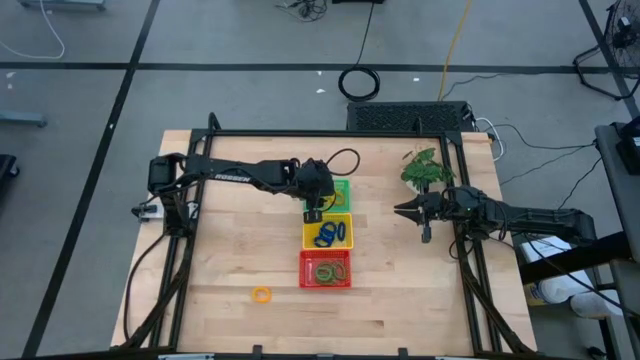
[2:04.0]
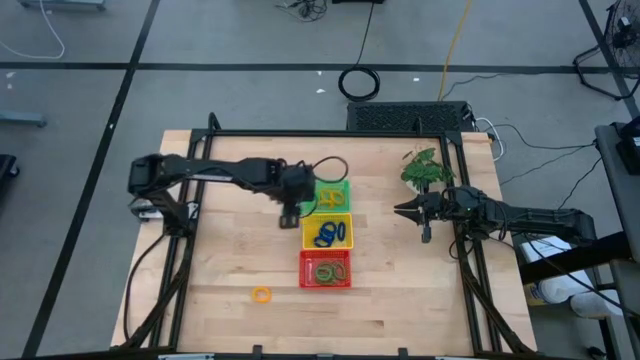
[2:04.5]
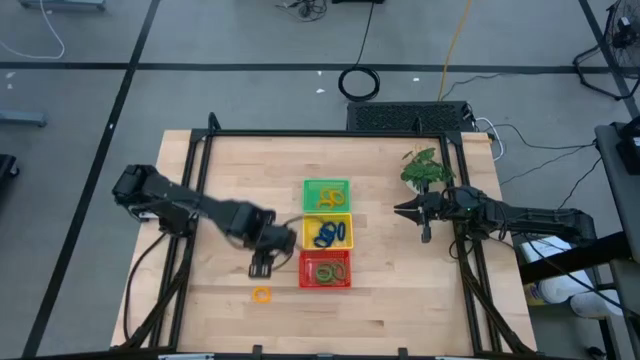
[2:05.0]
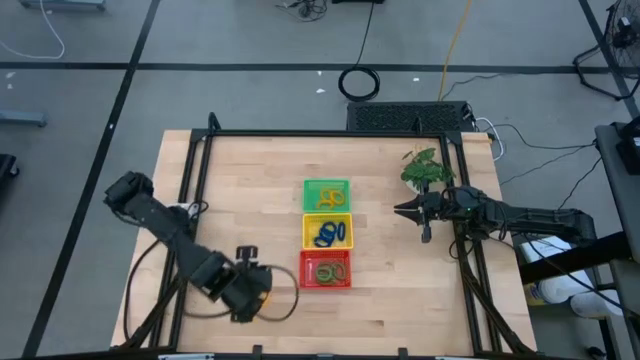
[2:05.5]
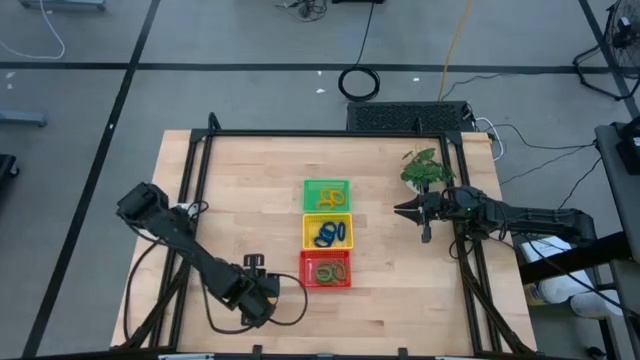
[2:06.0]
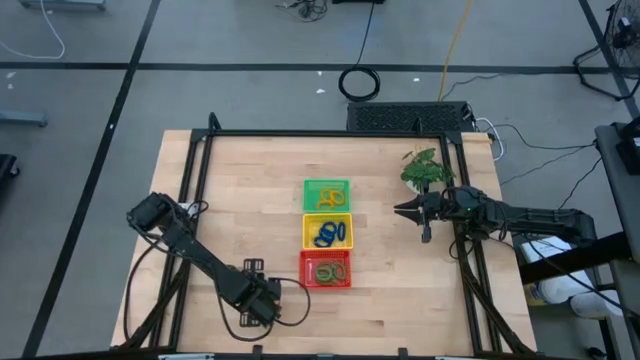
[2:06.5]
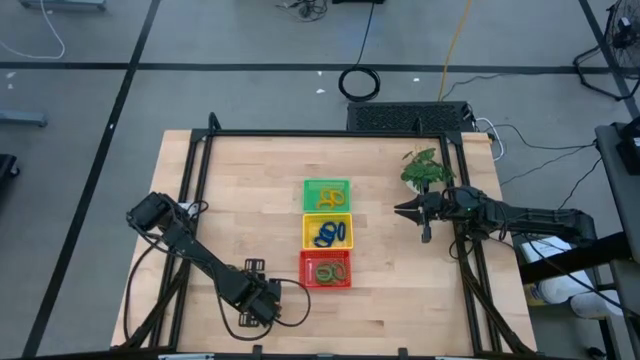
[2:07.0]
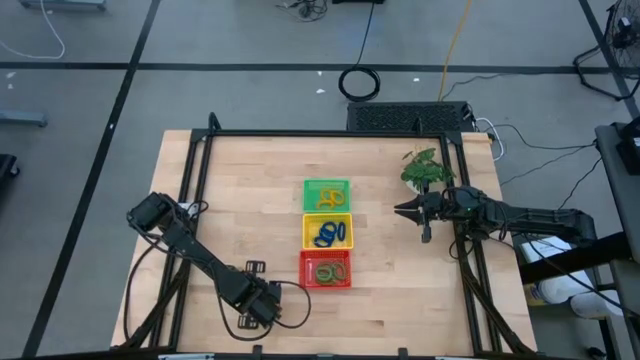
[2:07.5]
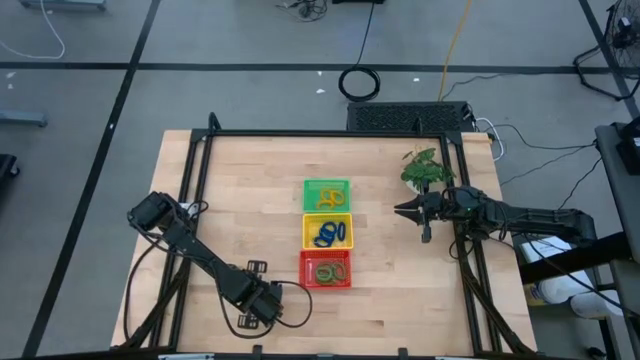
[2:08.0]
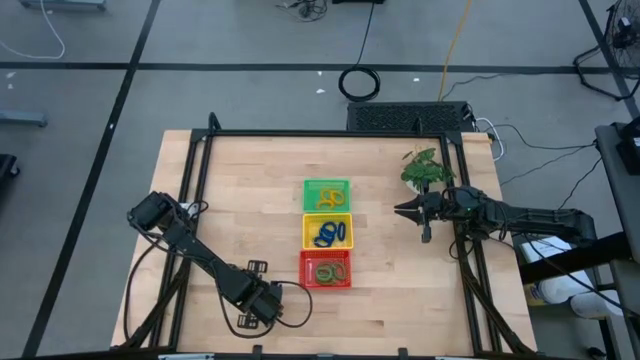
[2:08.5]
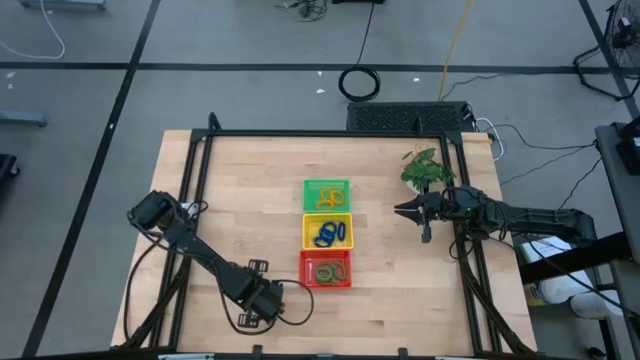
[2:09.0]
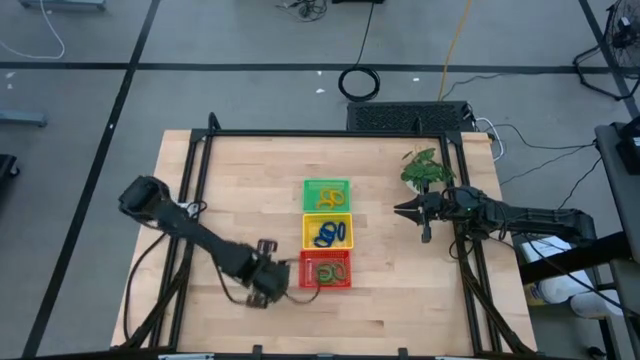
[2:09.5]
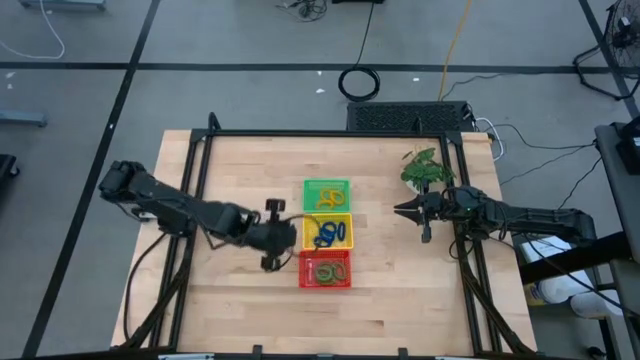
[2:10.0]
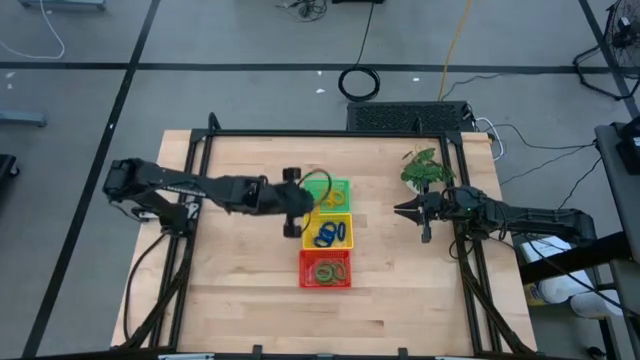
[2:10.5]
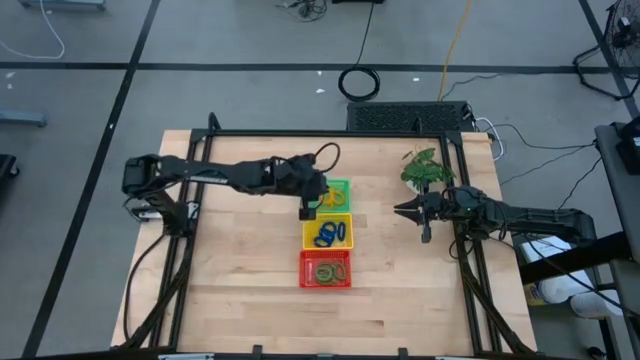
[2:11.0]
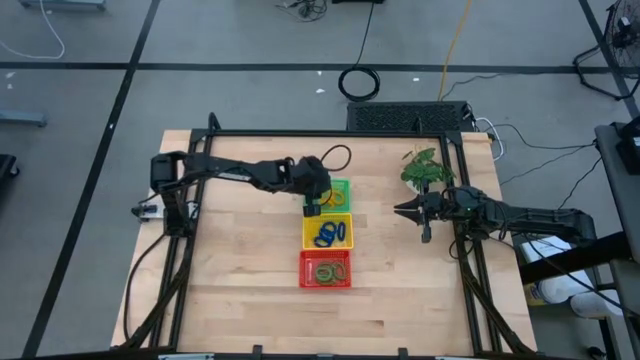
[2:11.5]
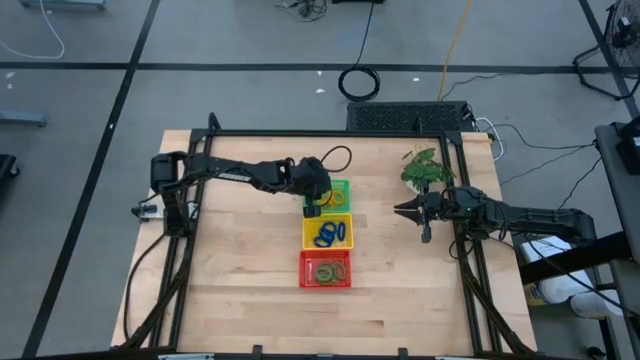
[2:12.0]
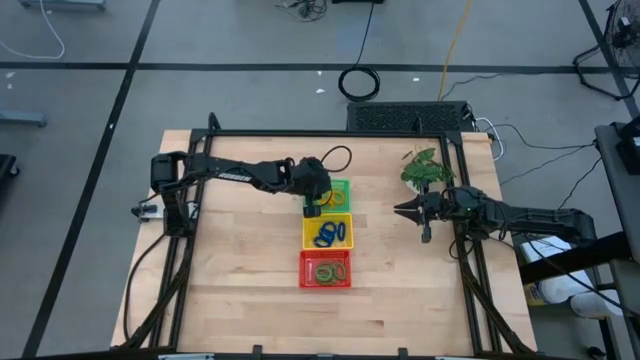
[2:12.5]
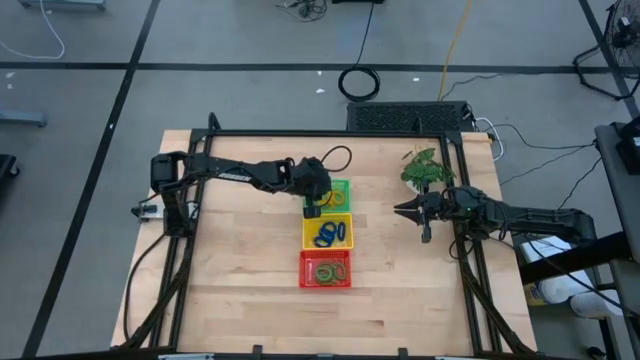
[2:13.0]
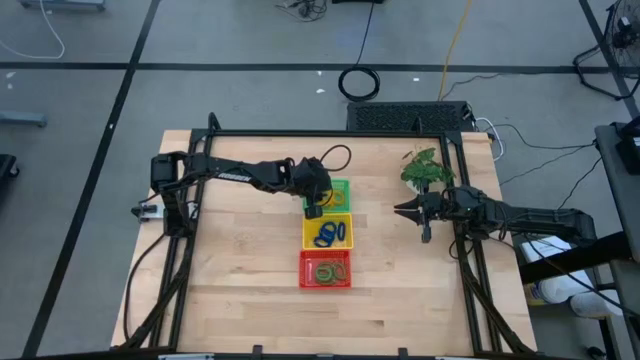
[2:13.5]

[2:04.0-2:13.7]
Task: Sort spring keychains into baskets
Put the yellow spring keychain into the green basket

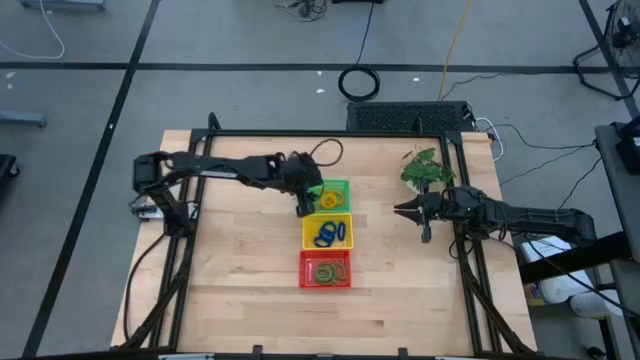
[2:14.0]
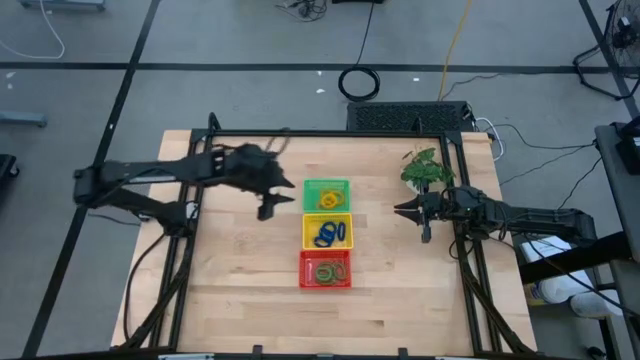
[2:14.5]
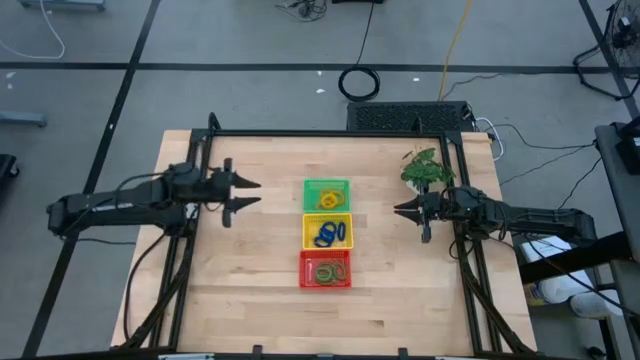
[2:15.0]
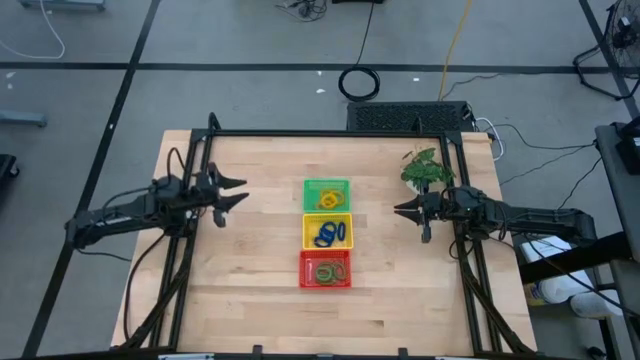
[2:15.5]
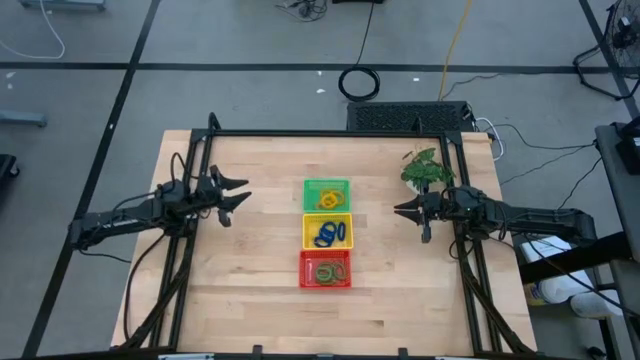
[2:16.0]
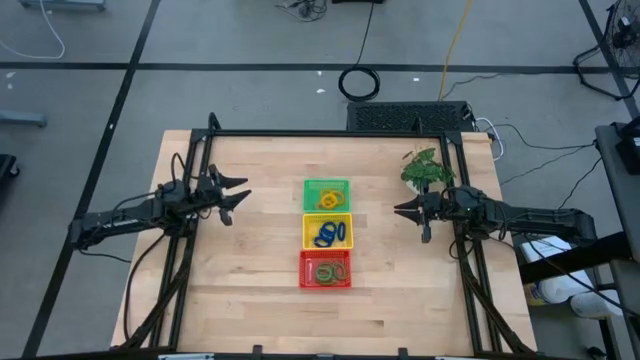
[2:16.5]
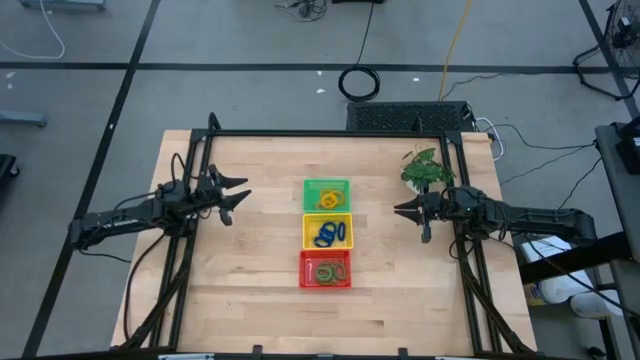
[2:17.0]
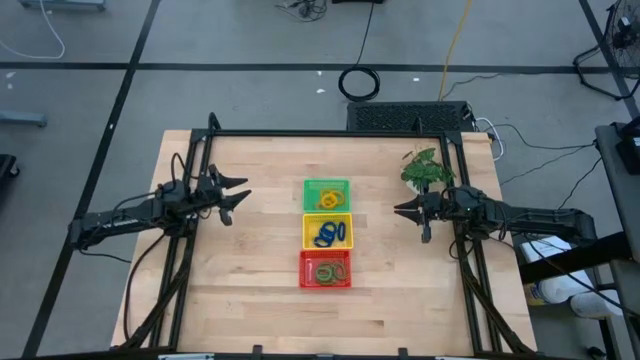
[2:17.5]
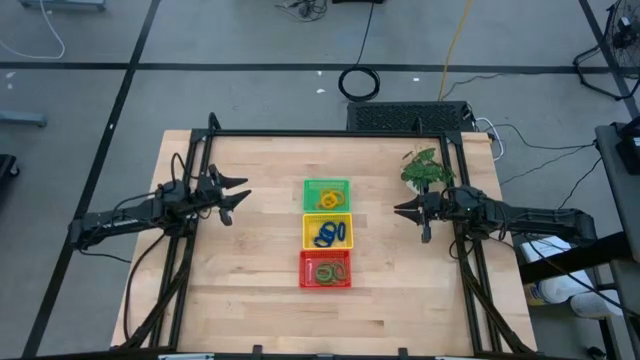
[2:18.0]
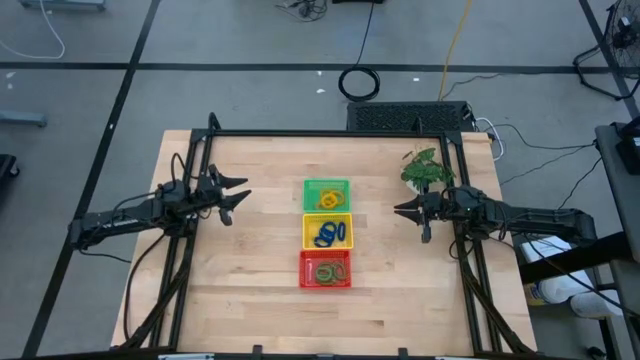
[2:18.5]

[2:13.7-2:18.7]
Return to Home Position

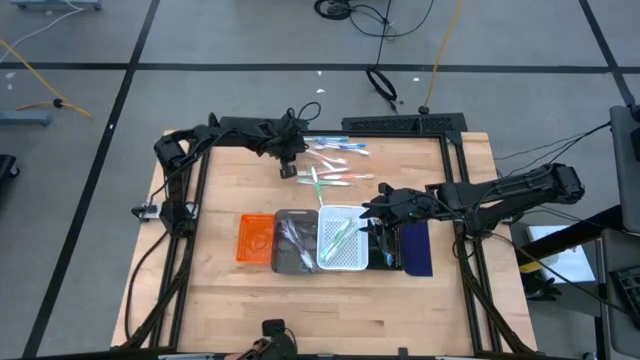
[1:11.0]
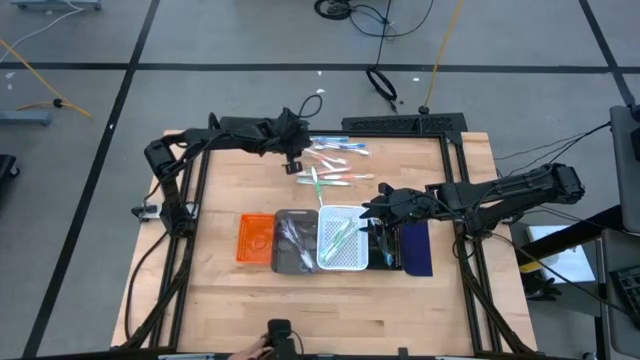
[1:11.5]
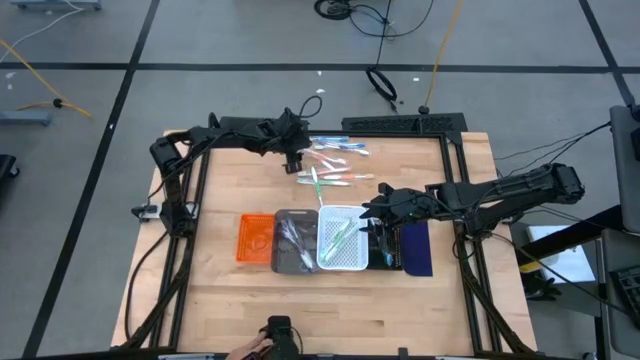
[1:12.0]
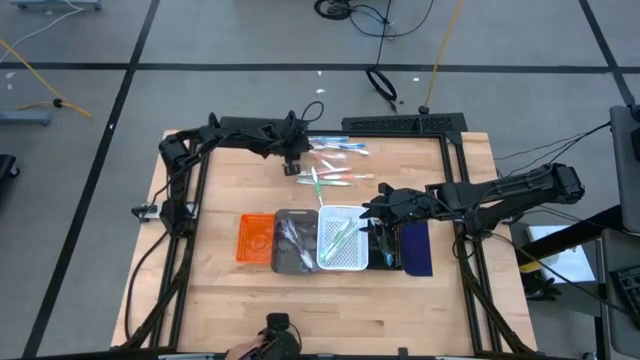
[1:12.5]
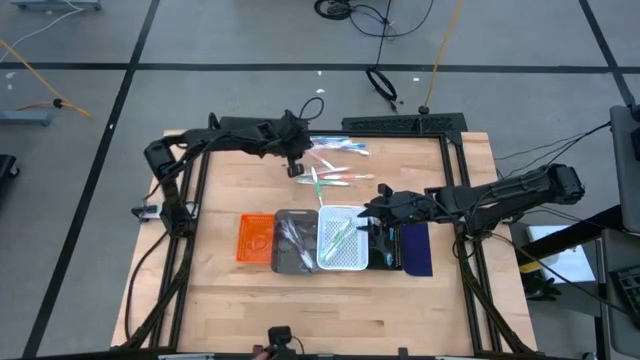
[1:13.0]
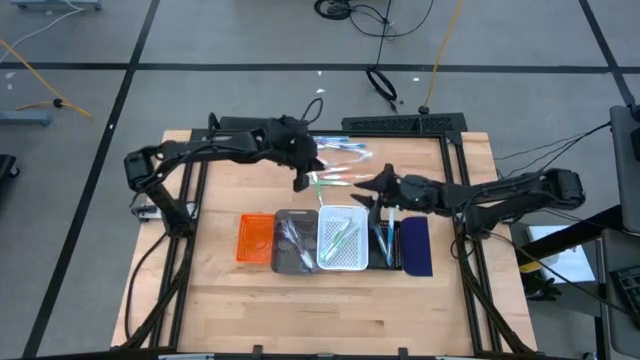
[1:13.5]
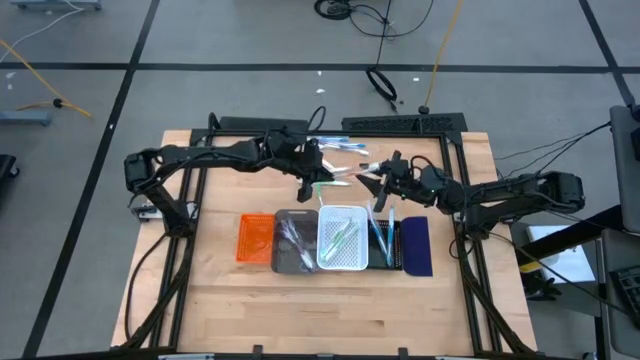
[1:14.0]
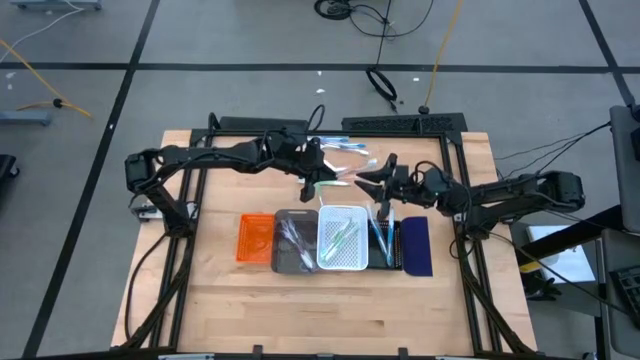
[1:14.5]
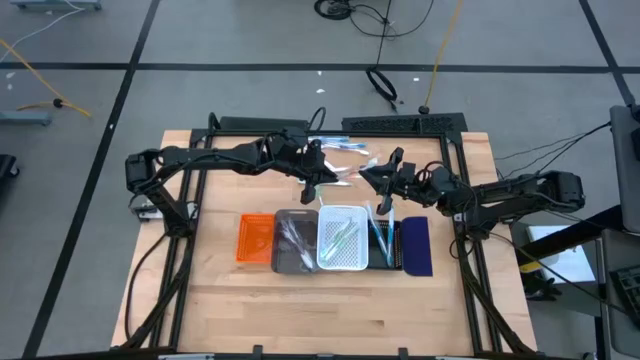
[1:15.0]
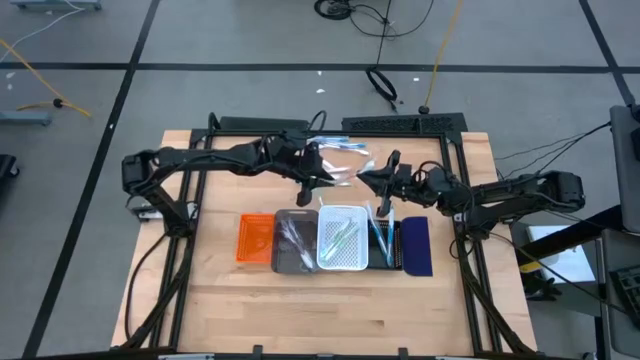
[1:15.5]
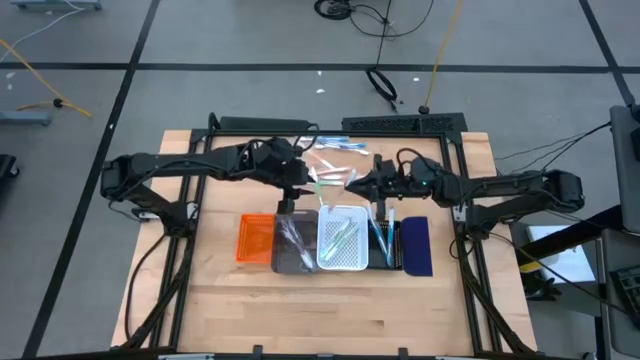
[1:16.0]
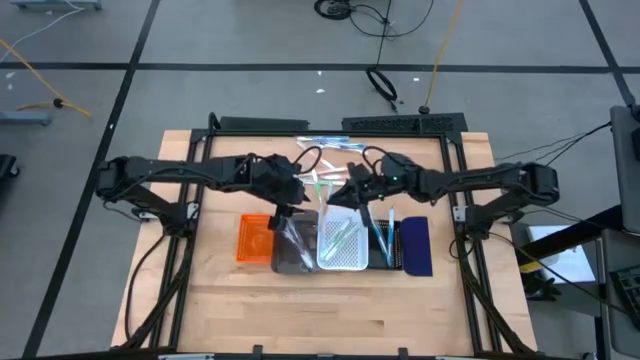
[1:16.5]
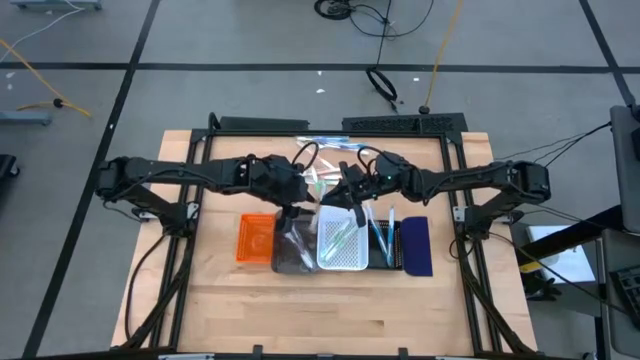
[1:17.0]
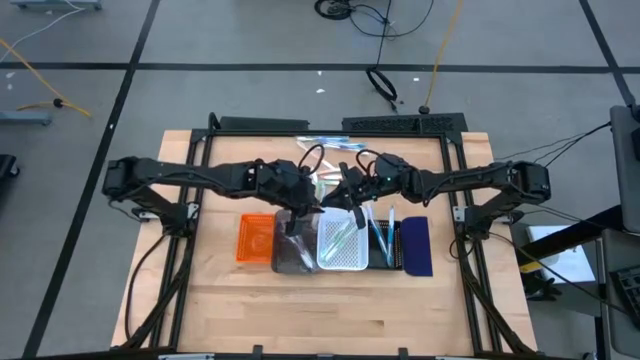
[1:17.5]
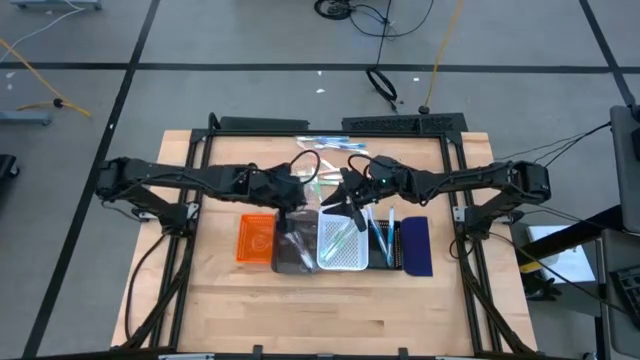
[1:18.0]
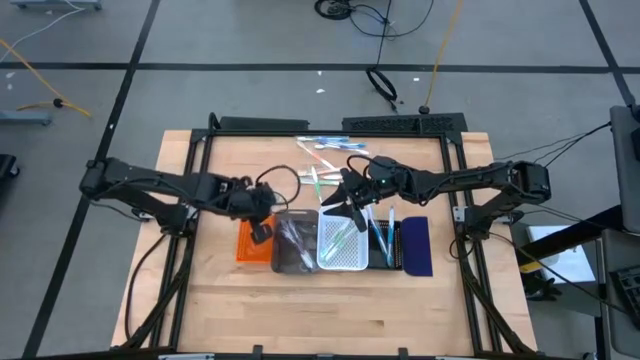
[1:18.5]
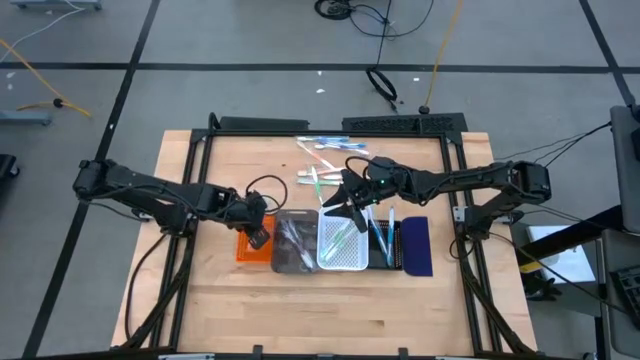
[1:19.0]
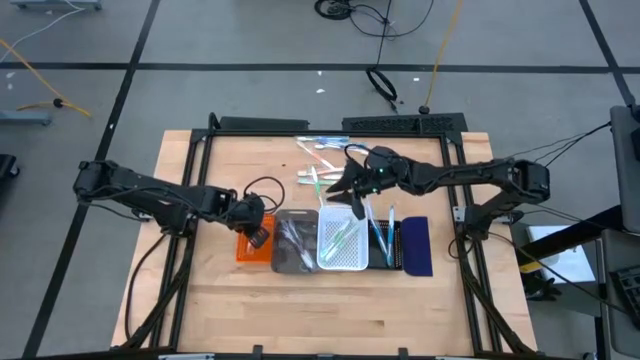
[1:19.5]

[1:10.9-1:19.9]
Task: Pick & Place Toothbrushes
Put the orange toothbrush into the orange bin
